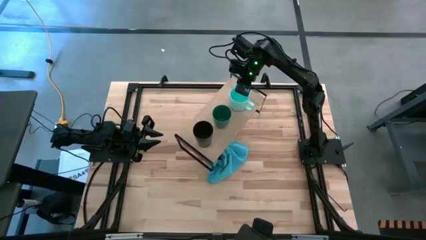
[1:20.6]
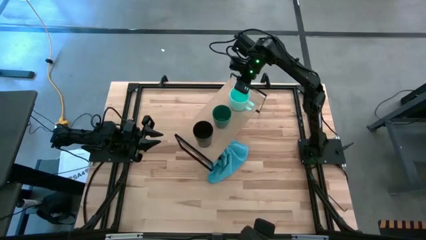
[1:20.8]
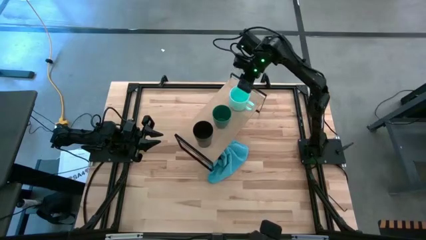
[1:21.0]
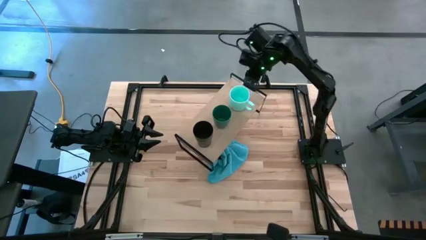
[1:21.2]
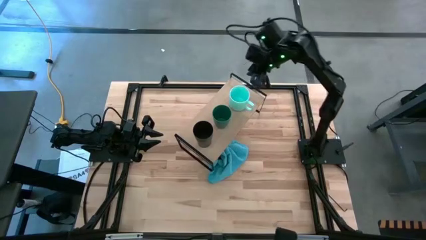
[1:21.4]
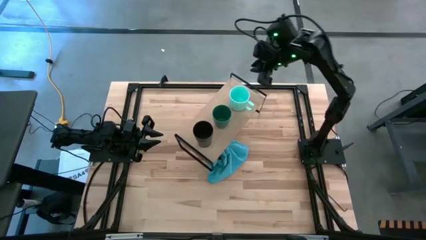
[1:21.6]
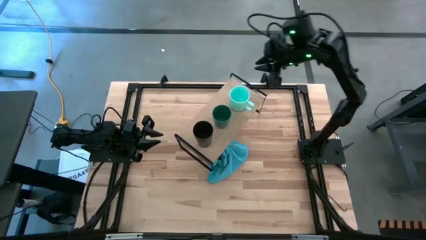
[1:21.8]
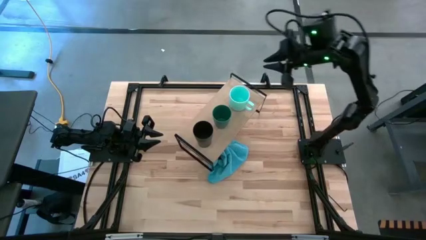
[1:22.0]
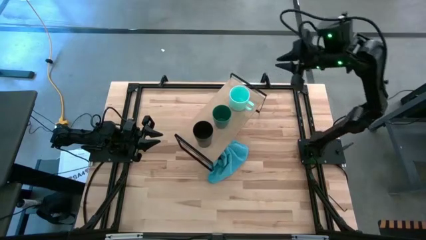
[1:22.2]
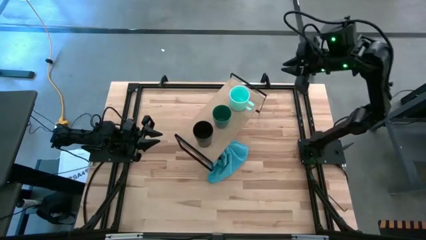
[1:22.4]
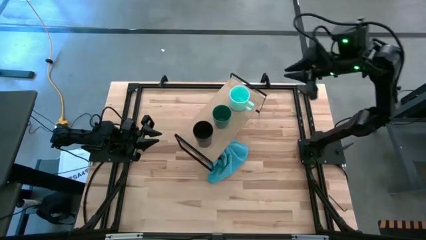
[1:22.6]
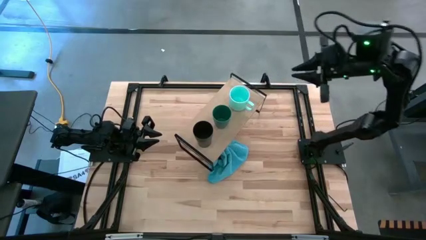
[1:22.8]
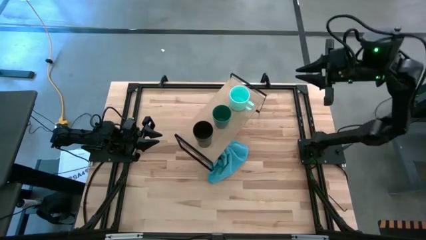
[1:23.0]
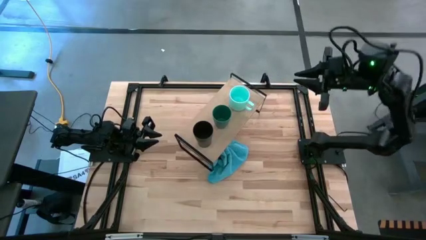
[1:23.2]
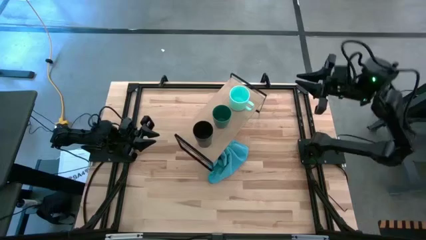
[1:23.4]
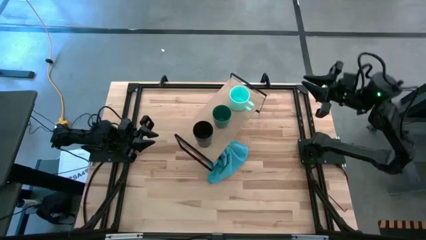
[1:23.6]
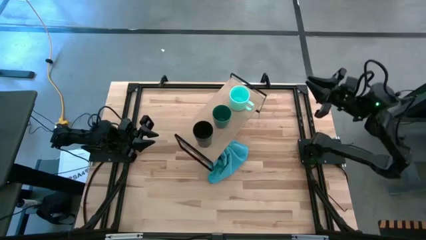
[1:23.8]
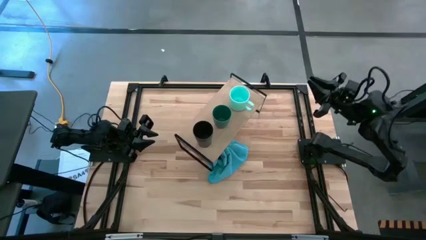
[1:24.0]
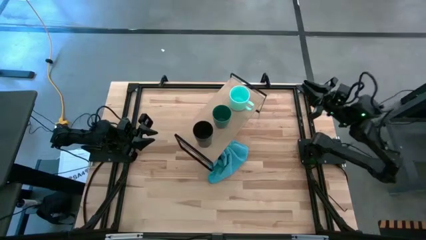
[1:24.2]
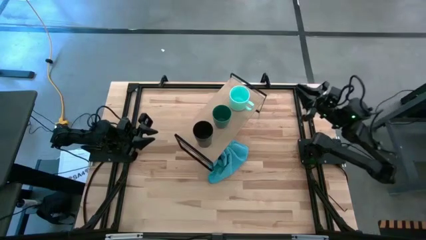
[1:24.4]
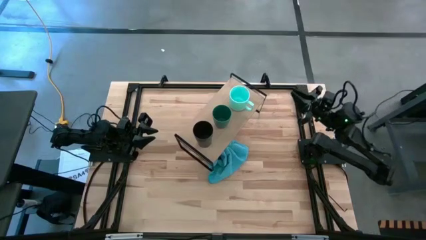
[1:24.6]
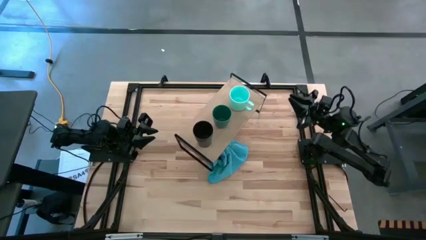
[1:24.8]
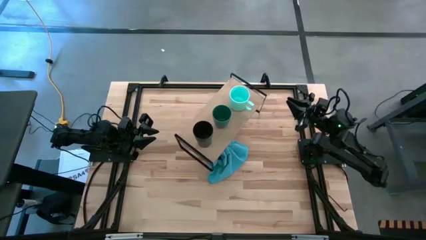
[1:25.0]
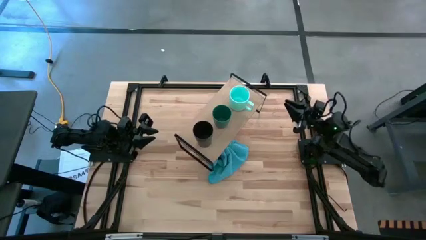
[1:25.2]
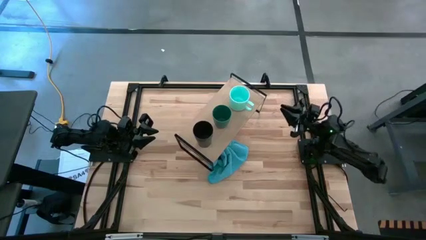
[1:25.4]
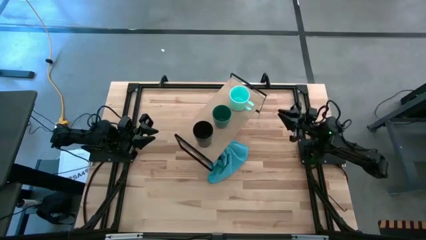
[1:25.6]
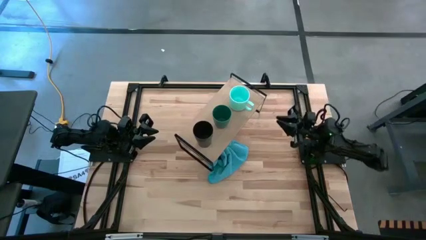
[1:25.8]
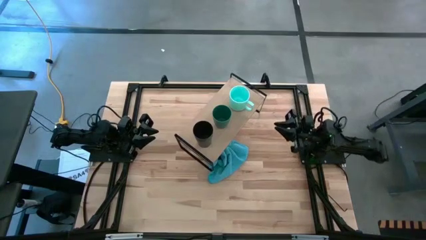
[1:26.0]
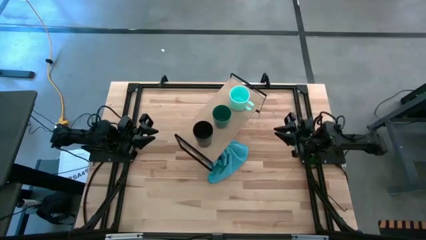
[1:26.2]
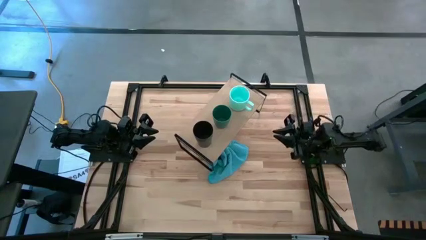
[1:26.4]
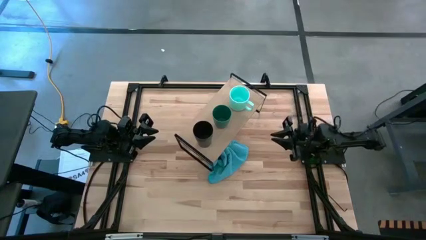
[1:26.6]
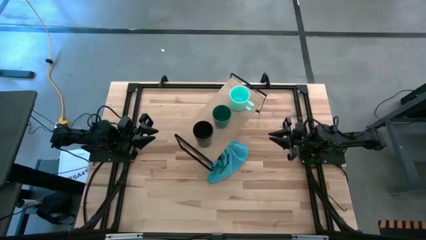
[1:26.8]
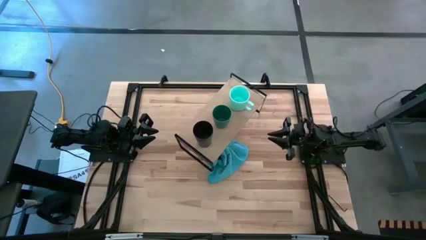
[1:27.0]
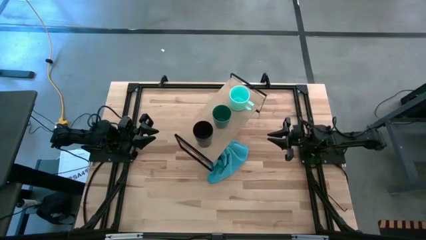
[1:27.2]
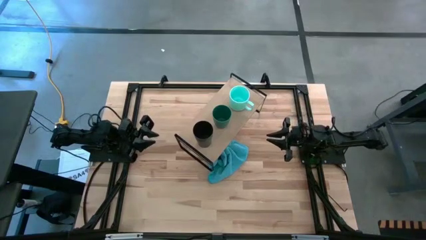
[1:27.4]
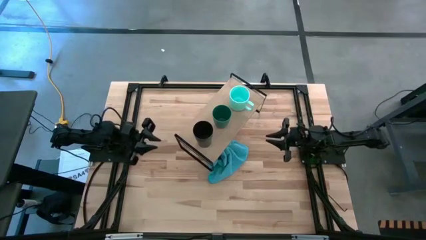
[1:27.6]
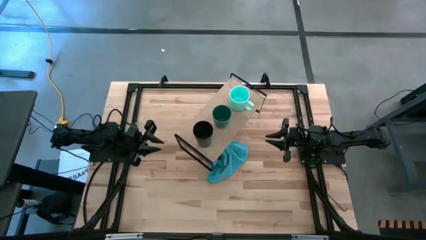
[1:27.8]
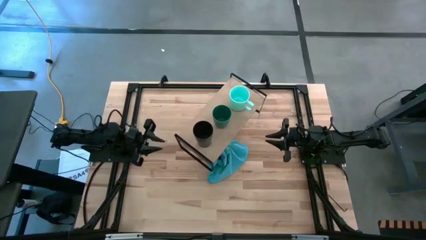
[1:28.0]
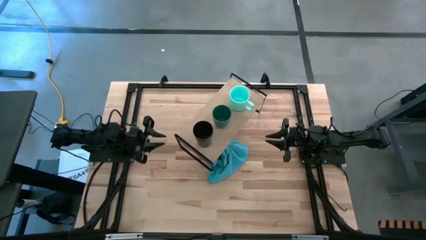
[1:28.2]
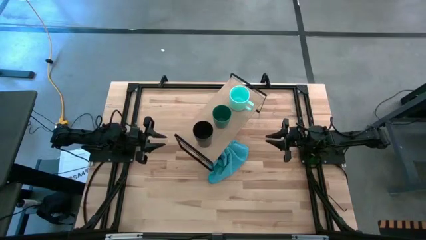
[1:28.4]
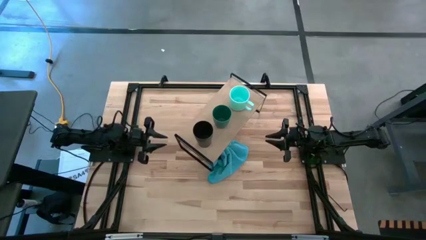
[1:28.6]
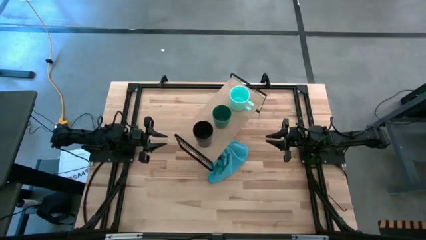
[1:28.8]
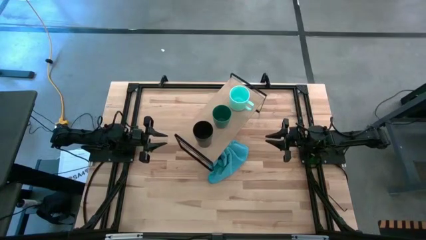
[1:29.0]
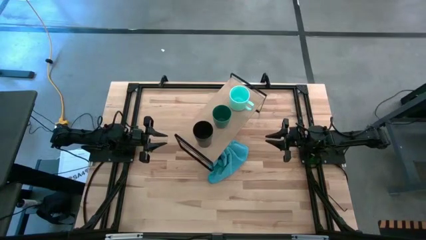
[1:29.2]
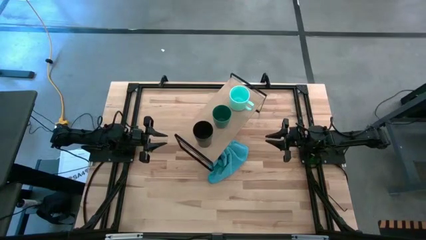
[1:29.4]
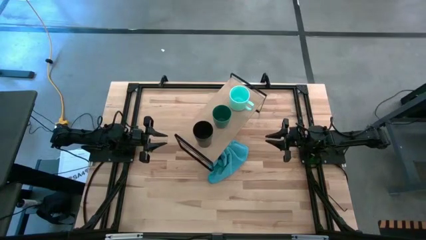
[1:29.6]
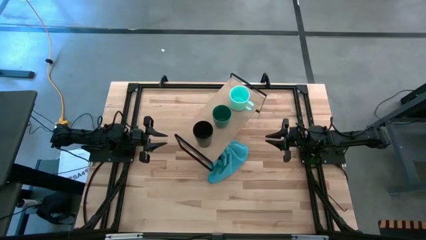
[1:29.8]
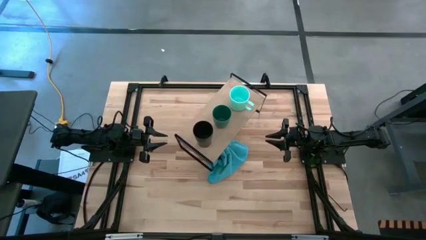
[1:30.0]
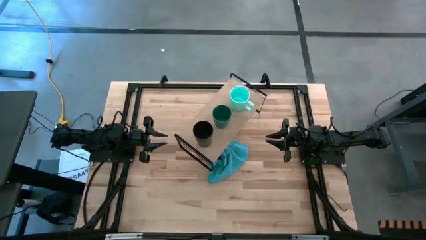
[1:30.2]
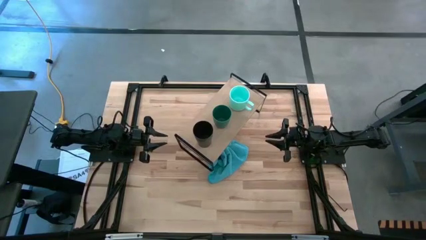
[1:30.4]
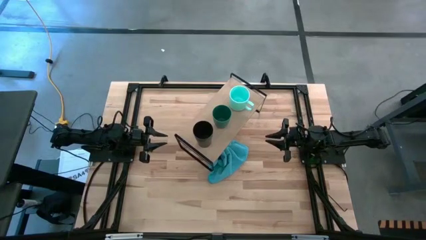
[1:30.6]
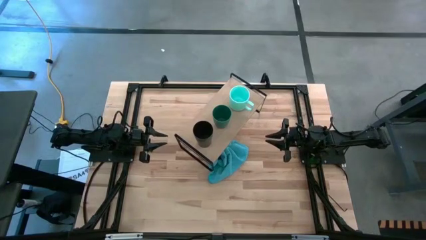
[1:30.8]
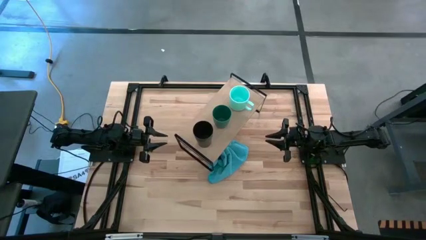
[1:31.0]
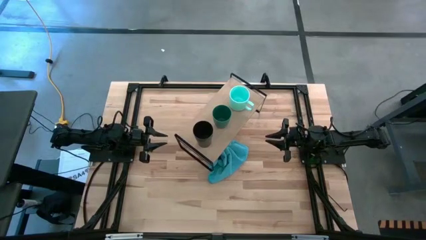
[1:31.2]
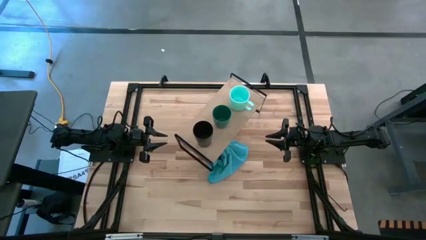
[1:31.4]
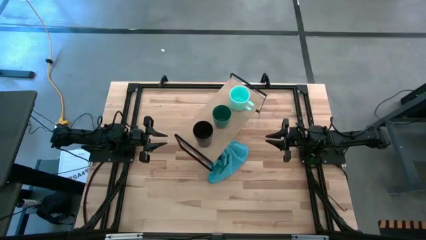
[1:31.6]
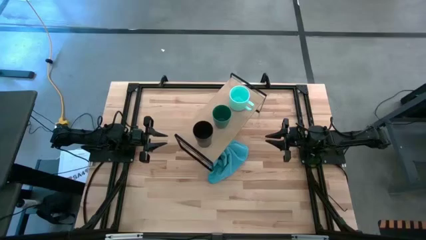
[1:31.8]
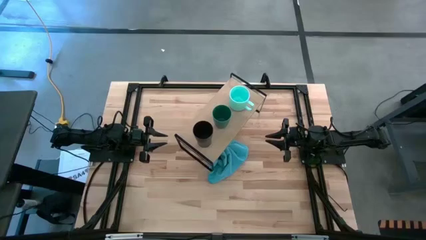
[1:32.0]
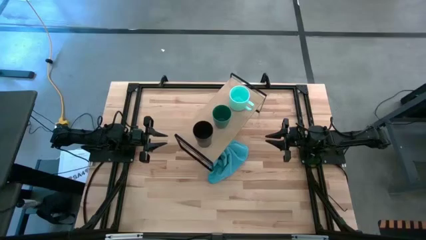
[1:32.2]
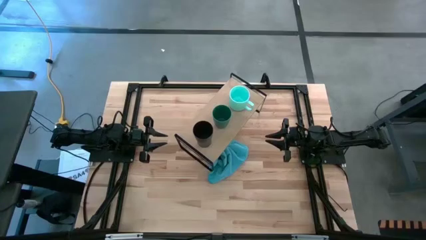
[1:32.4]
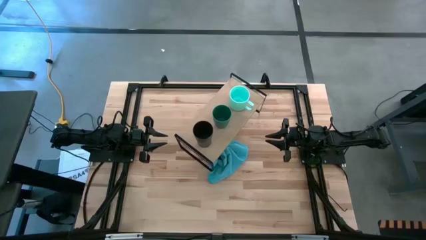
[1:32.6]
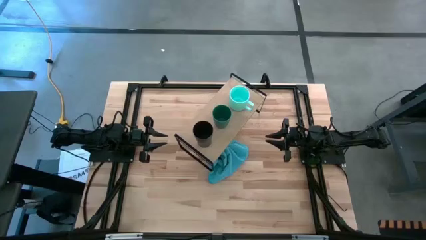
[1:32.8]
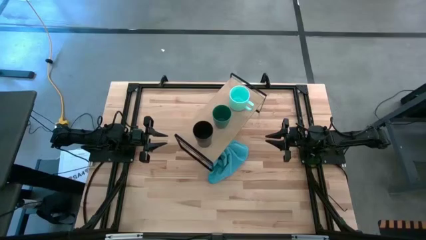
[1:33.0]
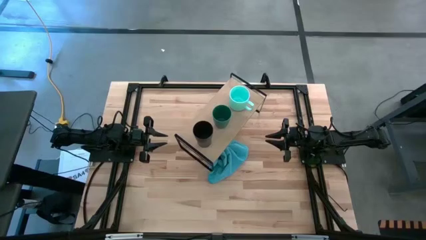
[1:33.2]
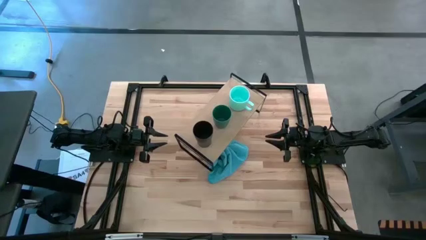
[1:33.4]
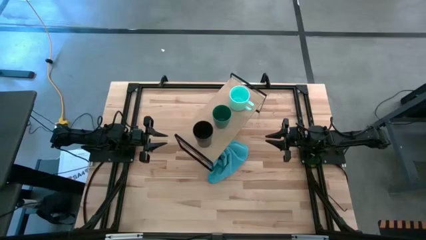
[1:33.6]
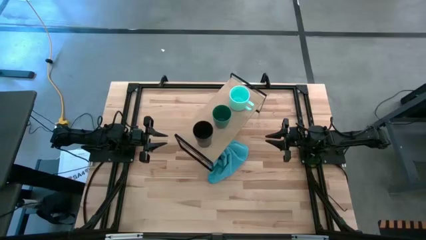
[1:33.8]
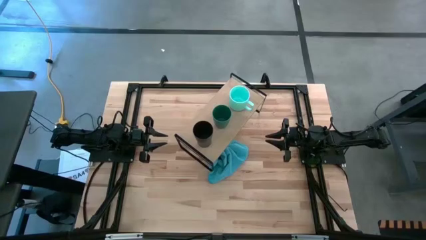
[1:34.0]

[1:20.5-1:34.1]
Task: Stack small to large cups/mugs on shelf
Return to Home Position

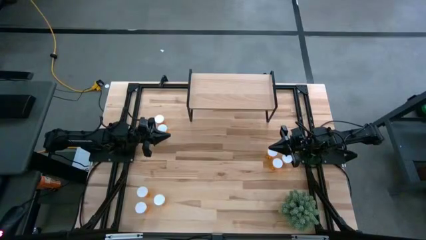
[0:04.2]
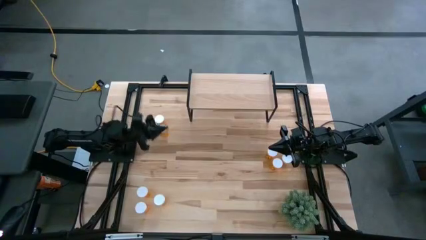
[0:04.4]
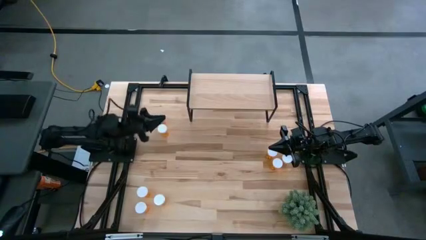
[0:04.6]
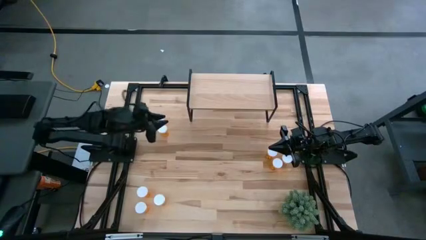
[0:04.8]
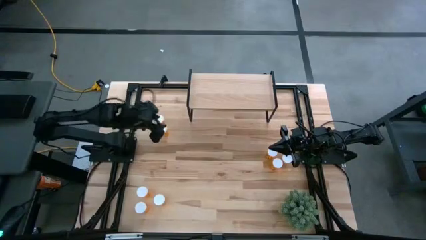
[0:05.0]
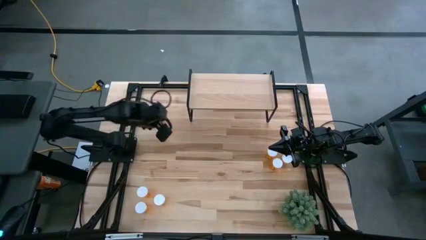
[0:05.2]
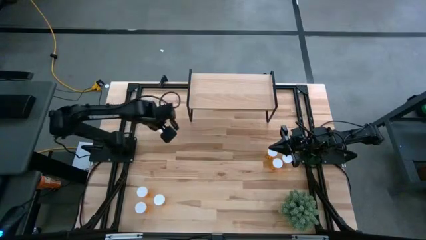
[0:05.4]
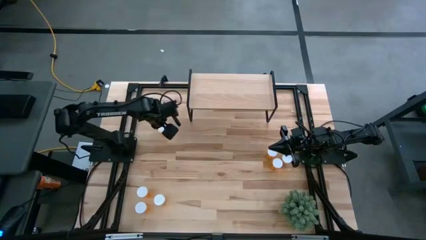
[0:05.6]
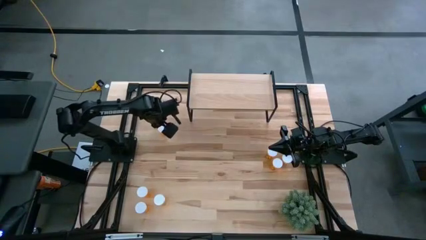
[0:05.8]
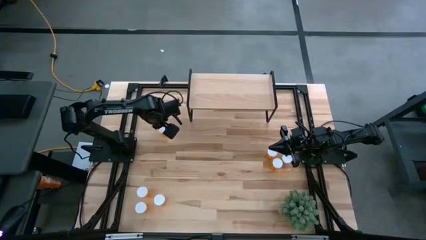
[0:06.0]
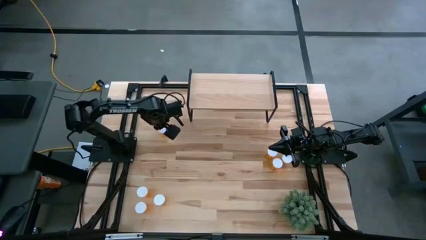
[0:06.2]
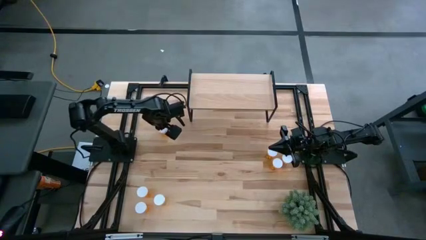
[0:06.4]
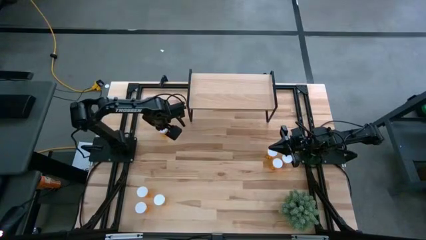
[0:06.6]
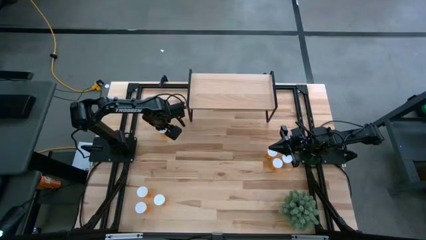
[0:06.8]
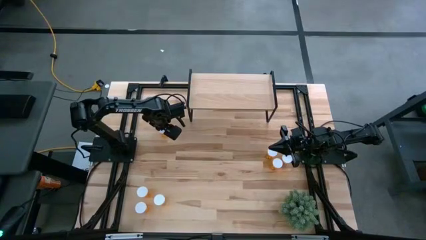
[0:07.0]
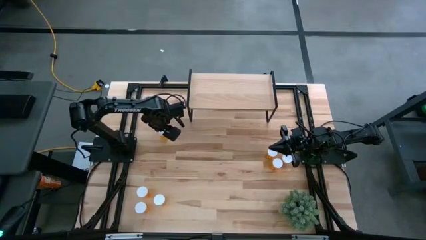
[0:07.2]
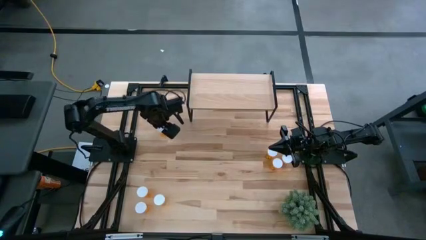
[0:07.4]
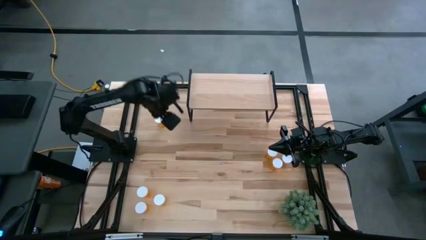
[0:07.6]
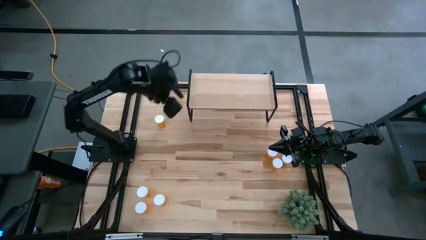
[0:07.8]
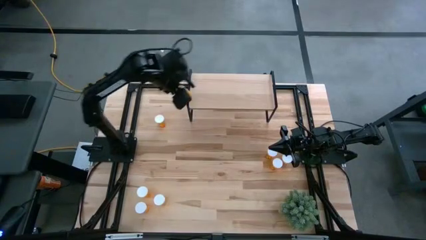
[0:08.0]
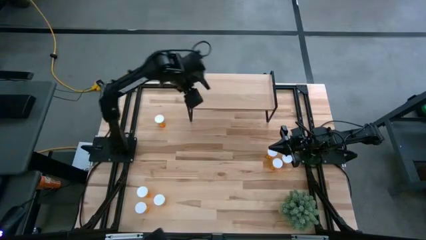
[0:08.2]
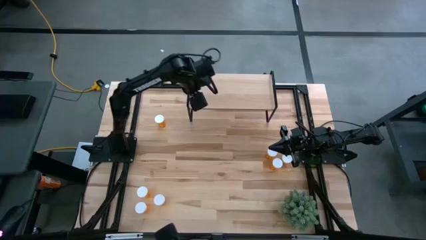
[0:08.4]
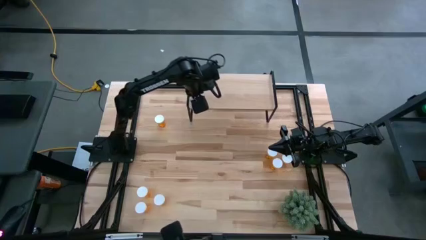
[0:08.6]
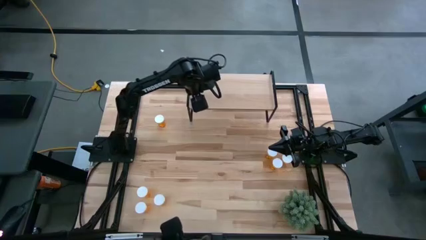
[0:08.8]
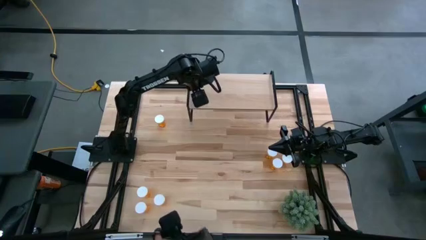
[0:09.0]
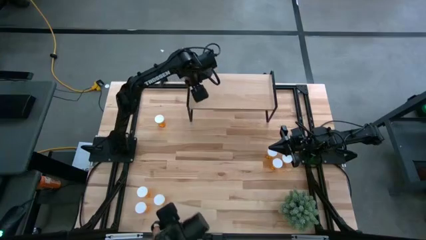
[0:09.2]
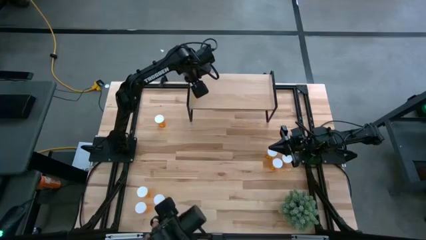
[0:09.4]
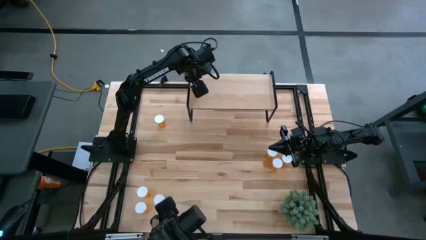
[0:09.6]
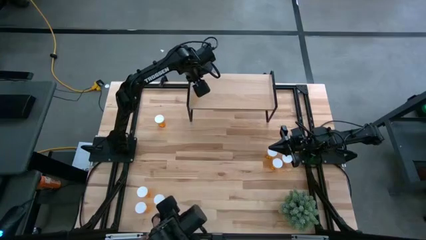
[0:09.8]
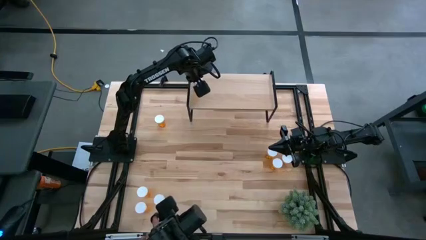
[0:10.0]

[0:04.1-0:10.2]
Task: Pick and place medicine bottles onto shelf by color
Put the orange pill bottle on the shelf
